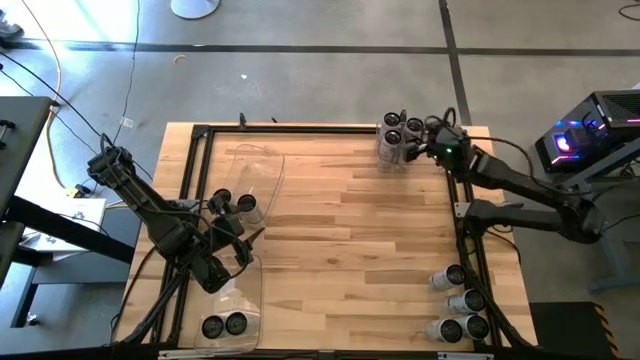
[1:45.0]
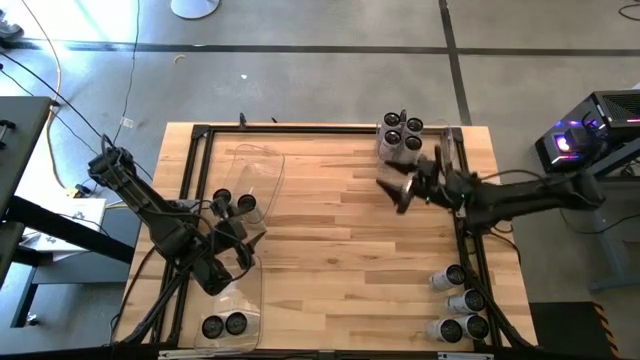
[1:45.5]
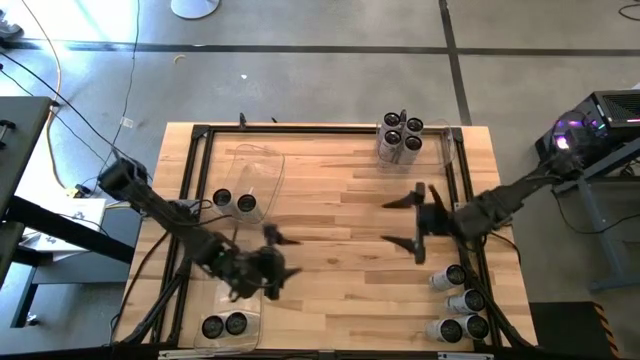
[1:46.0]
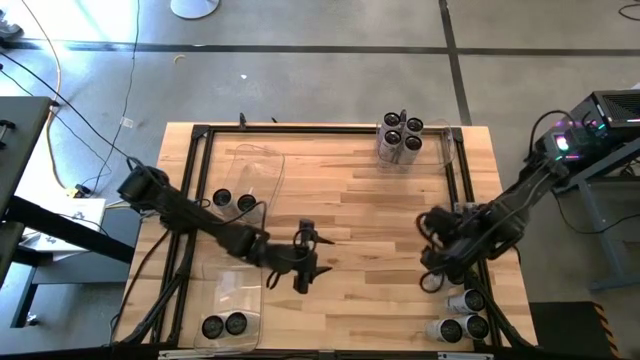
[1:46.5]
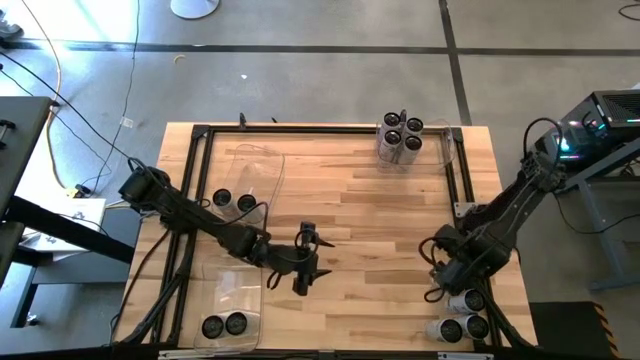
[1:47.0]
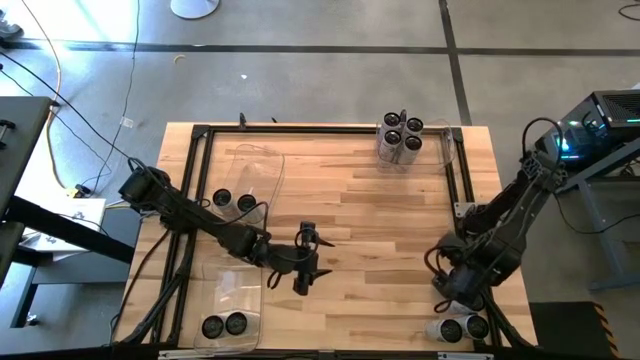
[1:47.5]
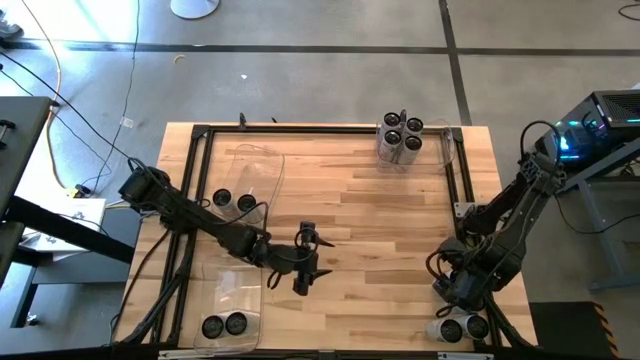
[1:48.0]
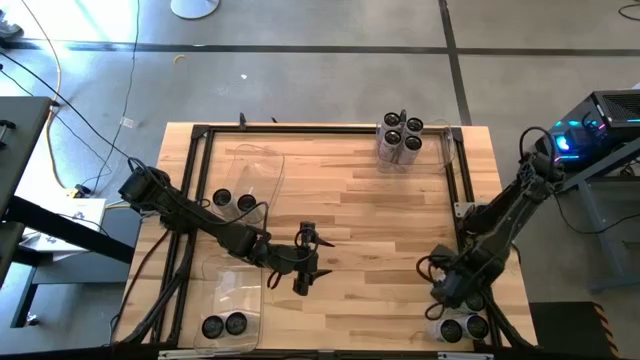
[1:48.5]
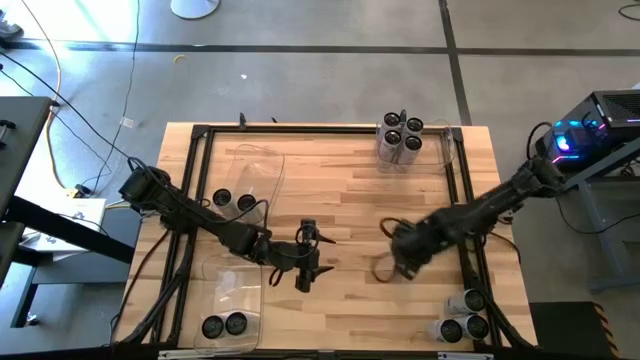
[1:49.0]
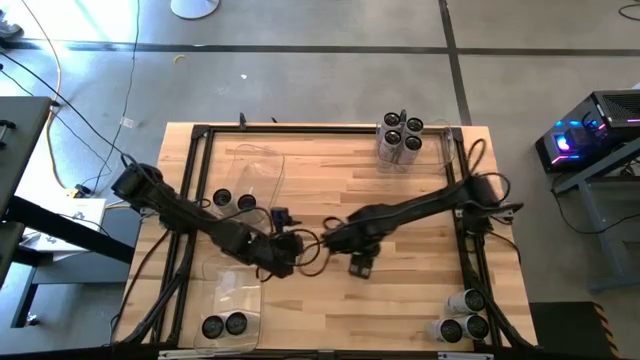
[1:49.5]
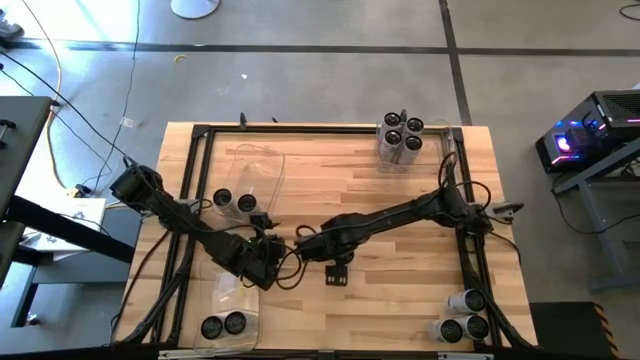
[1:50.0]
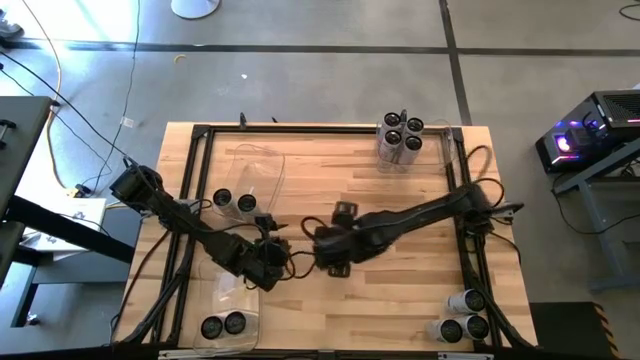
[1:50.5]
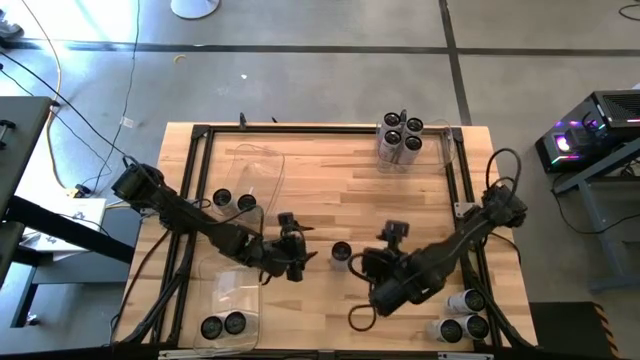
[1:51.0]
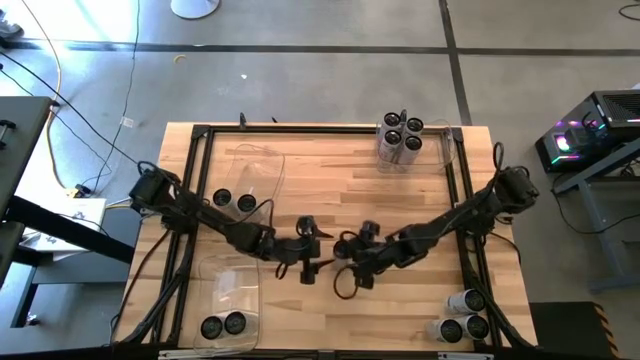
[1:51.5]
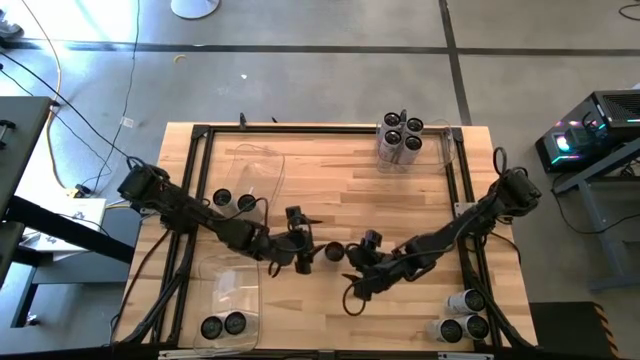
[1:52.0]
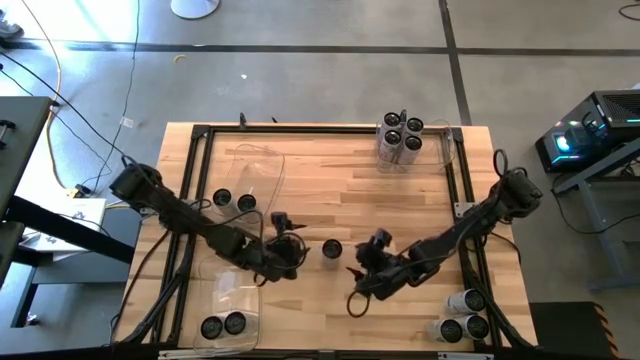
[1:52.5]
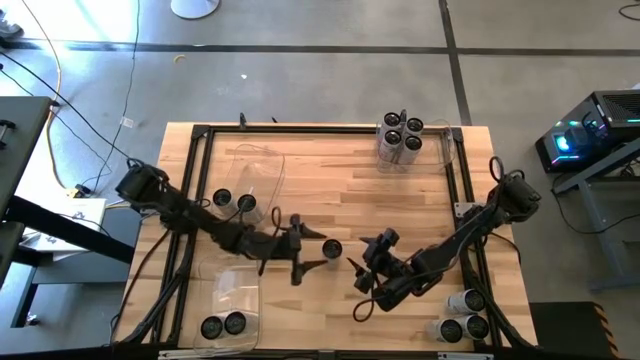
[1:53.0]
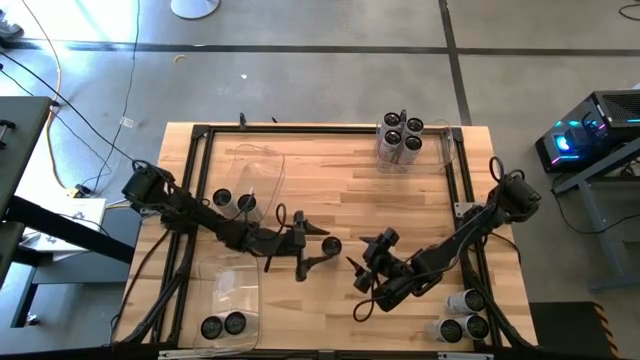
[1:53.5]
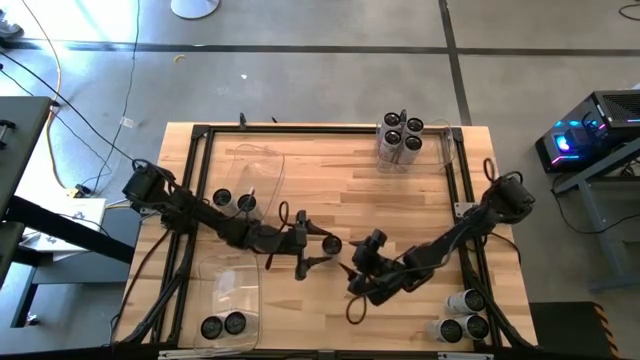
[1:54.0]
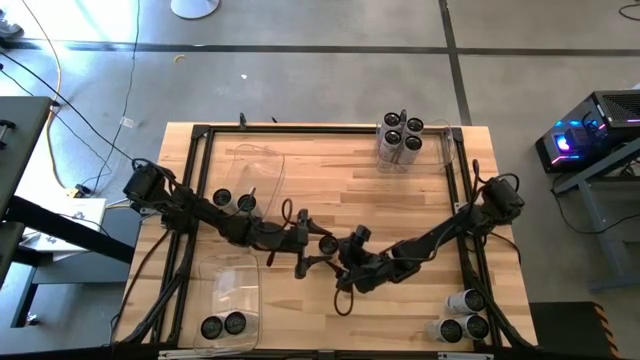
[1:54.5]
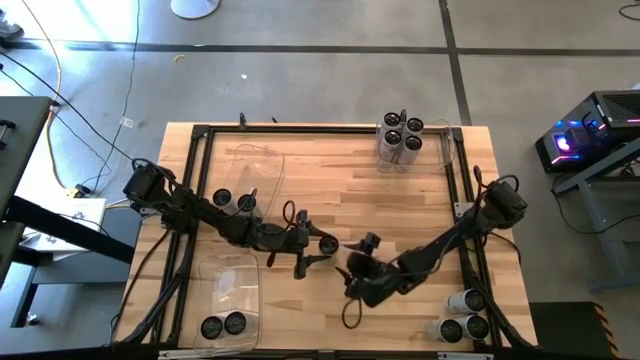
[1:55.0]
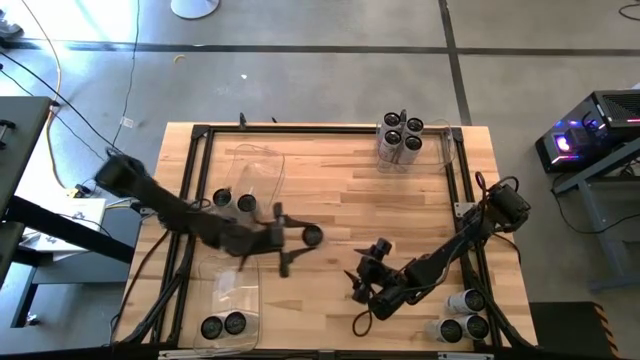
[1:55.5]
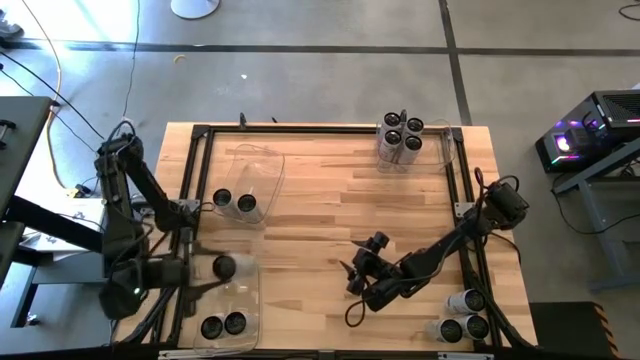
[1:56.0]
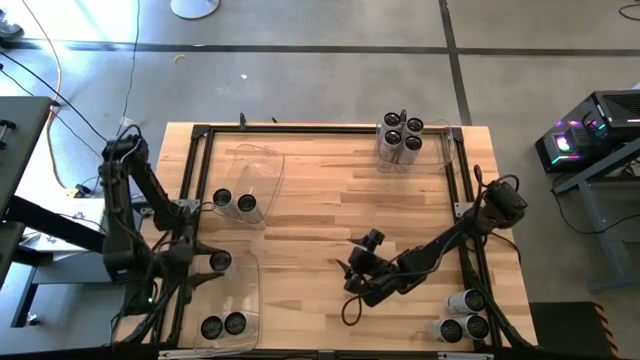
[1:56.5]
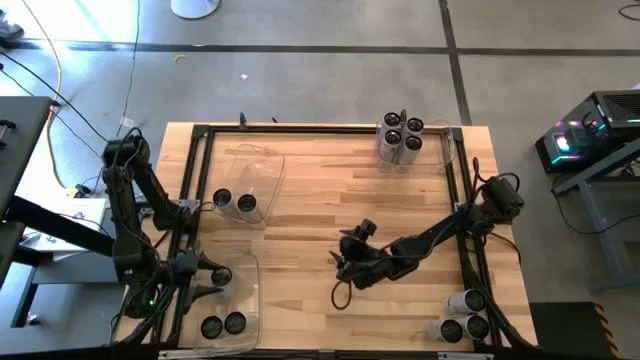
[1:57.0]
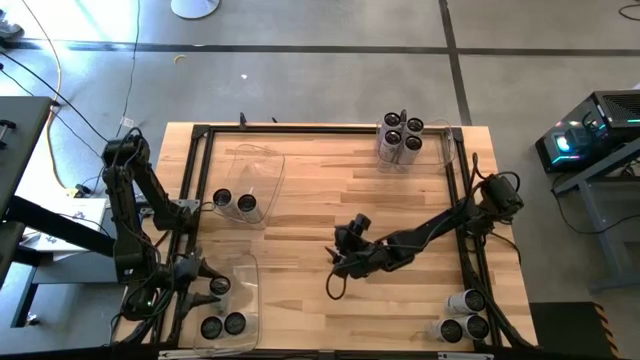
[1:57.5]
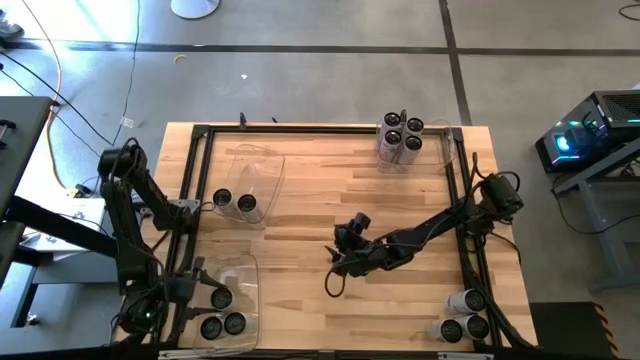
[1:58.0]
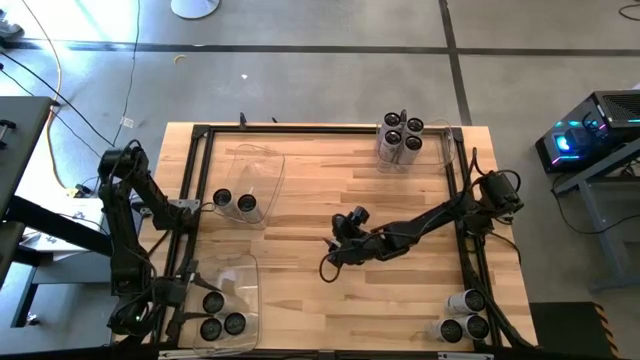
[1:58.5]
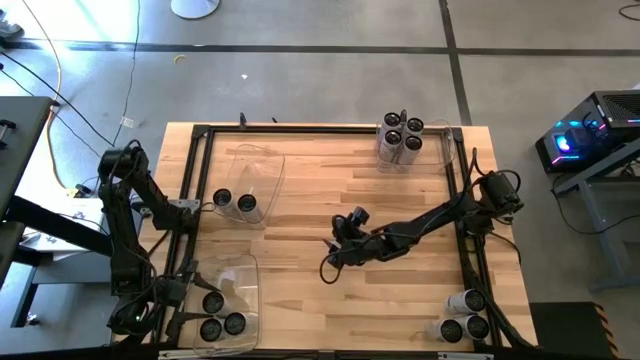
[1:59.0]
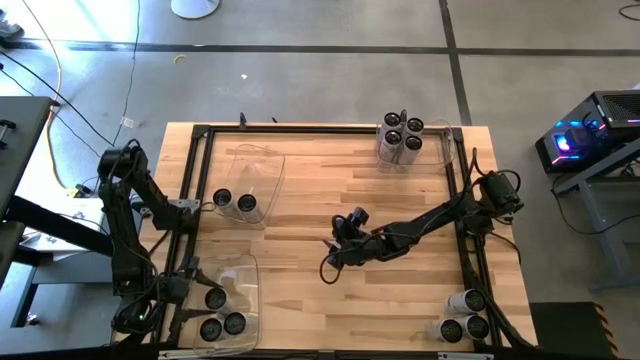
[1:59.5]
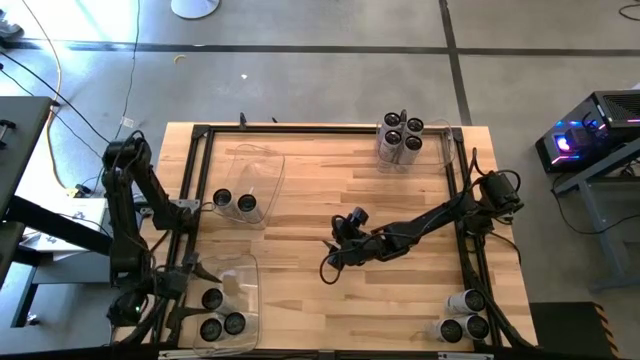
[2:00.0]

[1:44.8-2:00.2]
Task: Sort soda cans
Put the white blue soda can into the bottom transparent bin

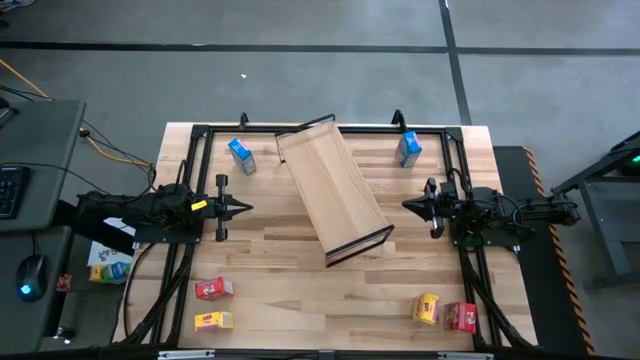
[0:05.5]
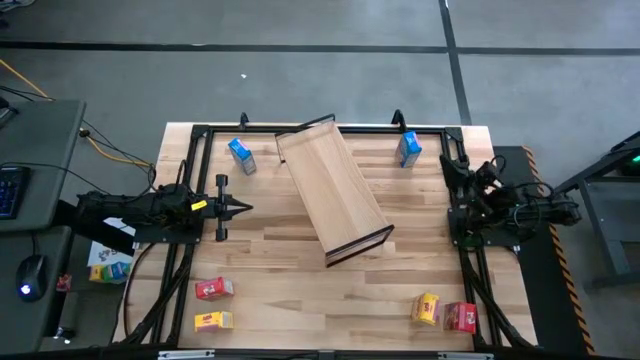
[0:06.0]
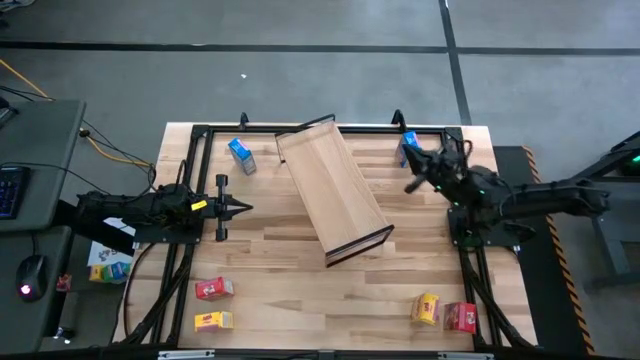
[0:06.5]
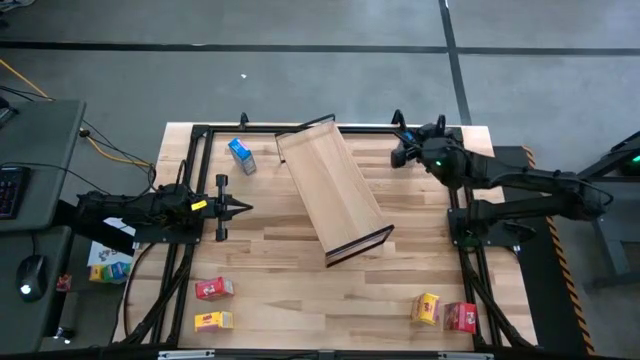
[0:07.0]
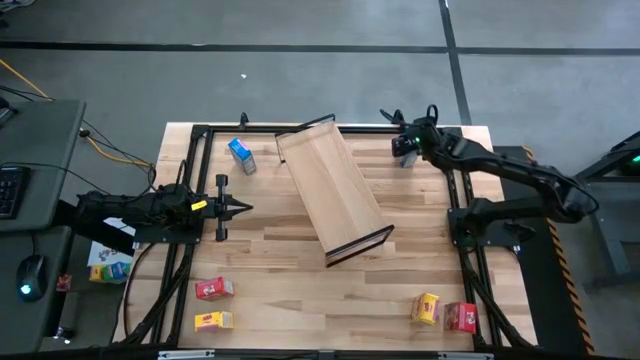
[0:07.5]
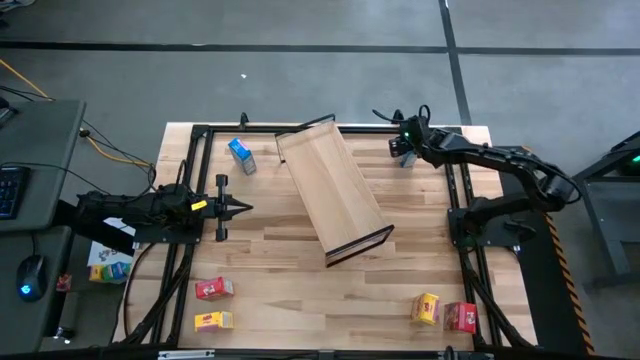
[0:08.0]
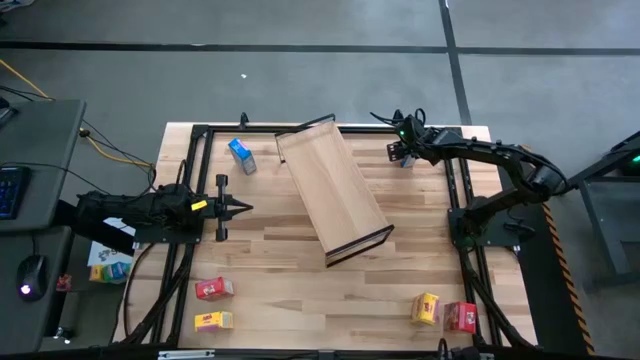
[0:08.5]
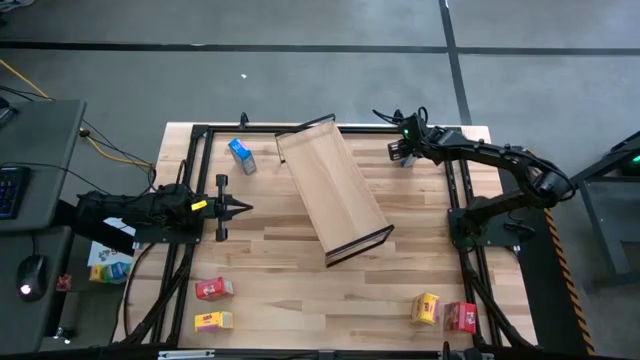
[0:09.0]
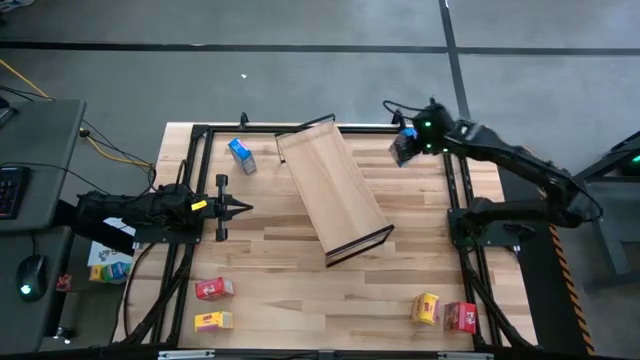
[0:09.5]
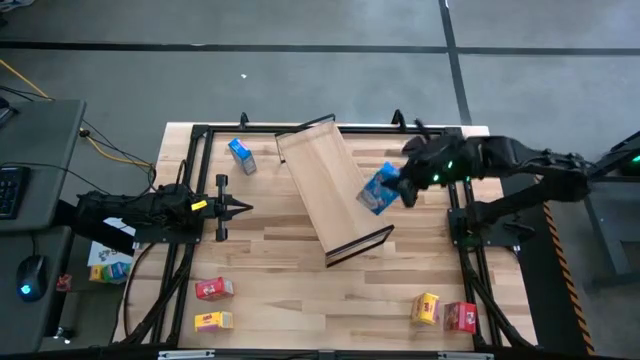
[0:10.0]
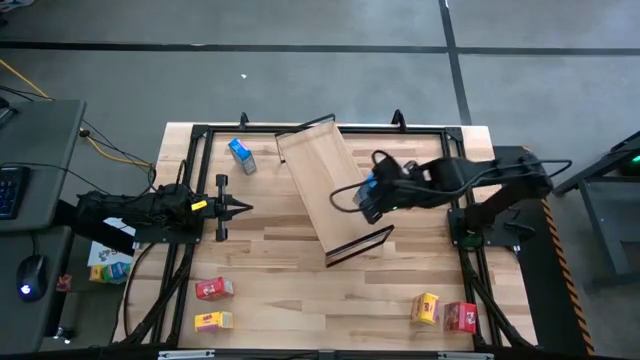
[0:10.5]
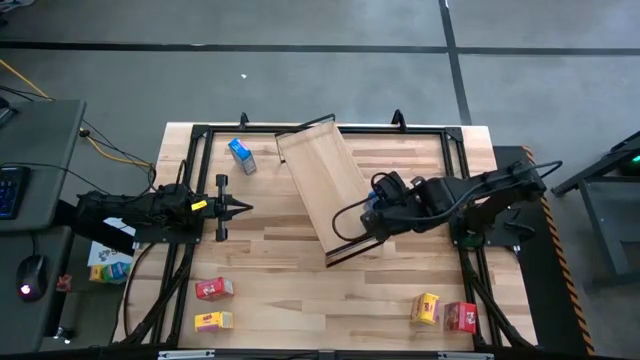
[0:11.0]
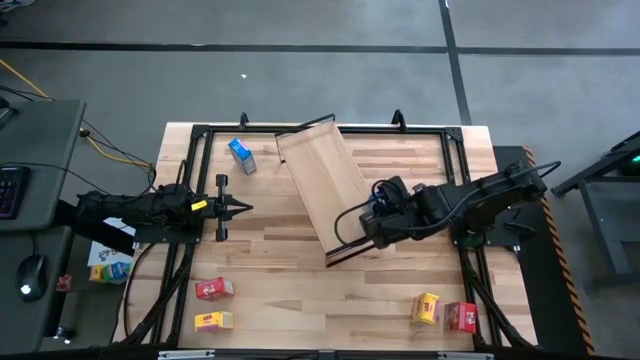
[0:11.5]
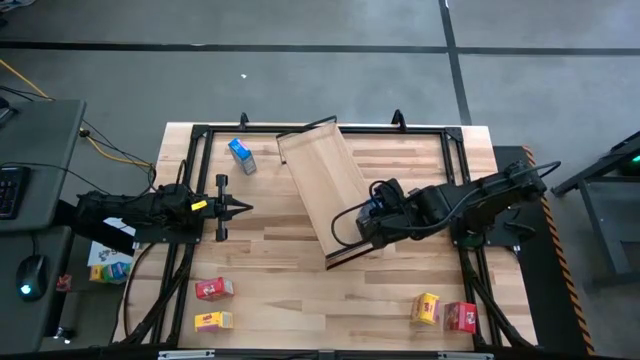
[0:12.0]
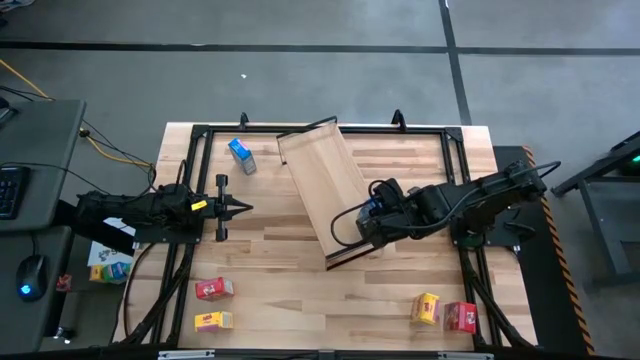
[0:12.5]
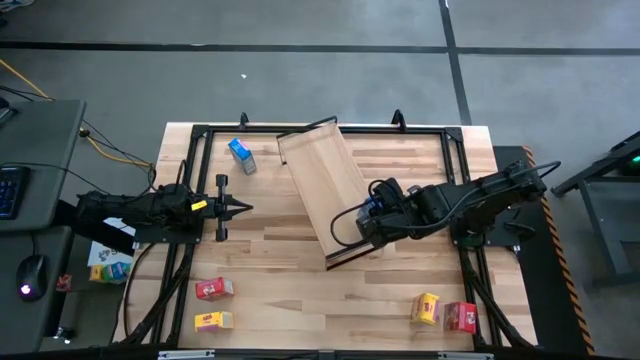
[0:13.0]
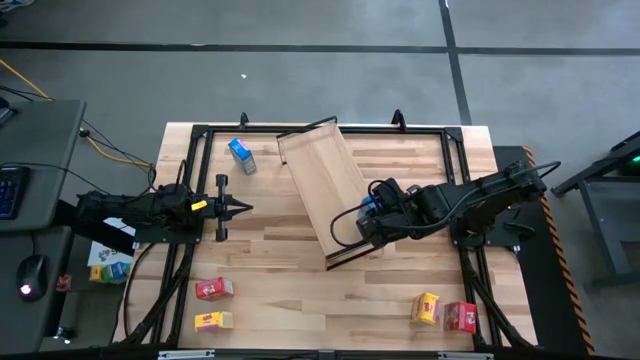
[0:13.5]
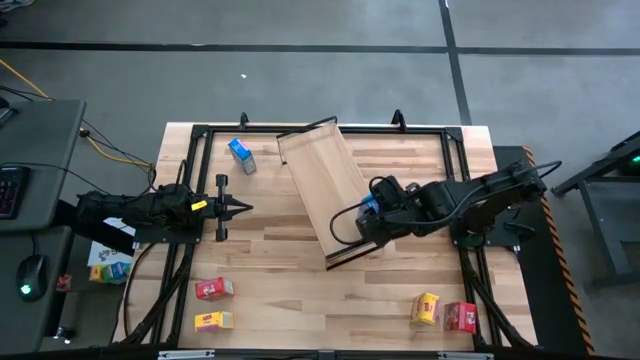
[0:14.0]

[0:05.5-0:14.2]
Task: Stack cereal on shelf
Put the right blue cereal box on the shelf
